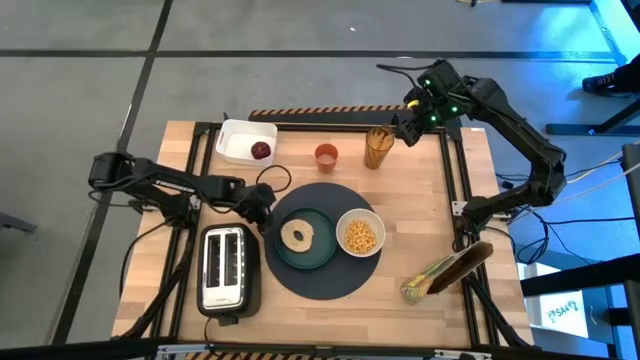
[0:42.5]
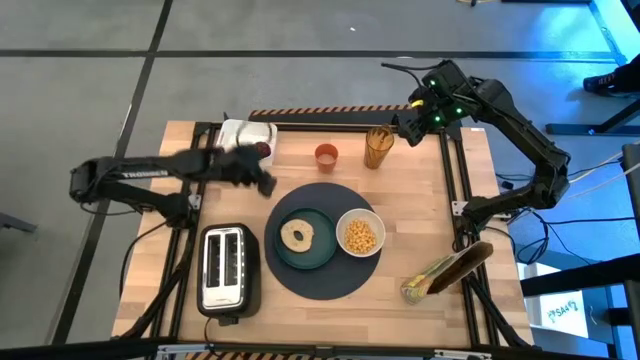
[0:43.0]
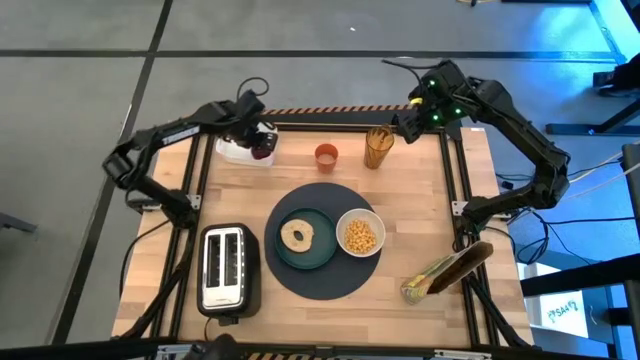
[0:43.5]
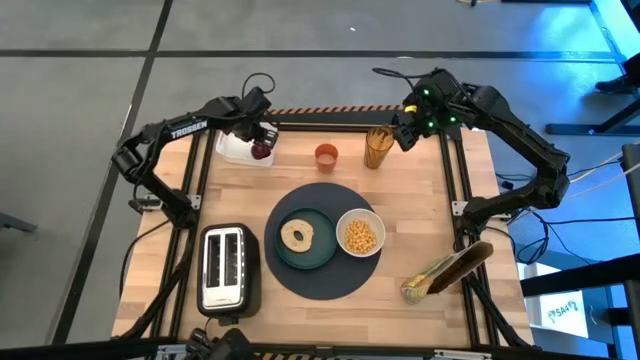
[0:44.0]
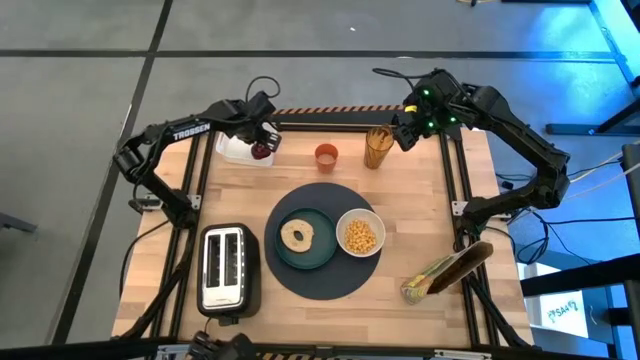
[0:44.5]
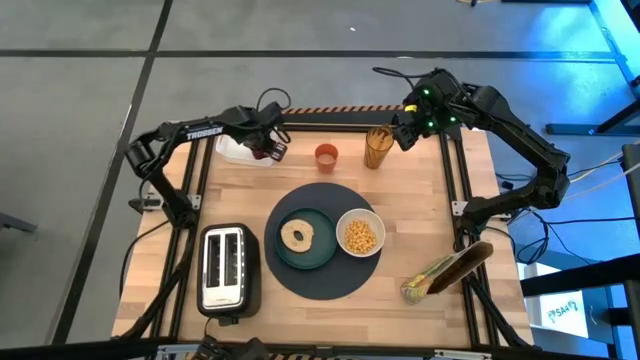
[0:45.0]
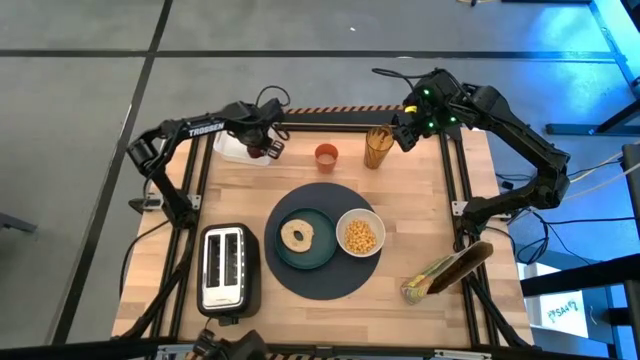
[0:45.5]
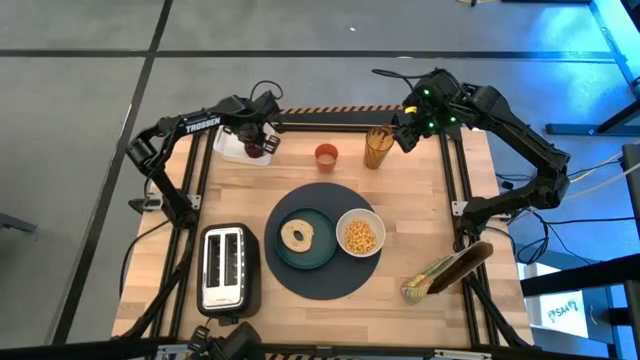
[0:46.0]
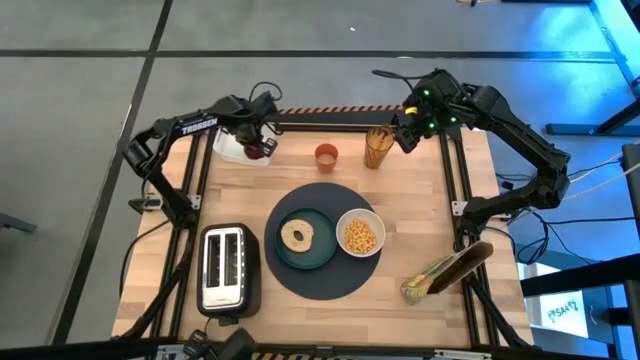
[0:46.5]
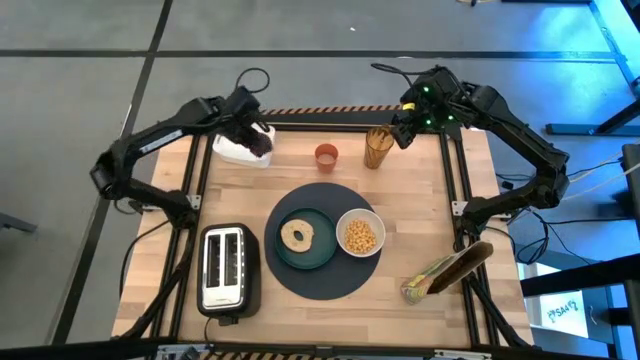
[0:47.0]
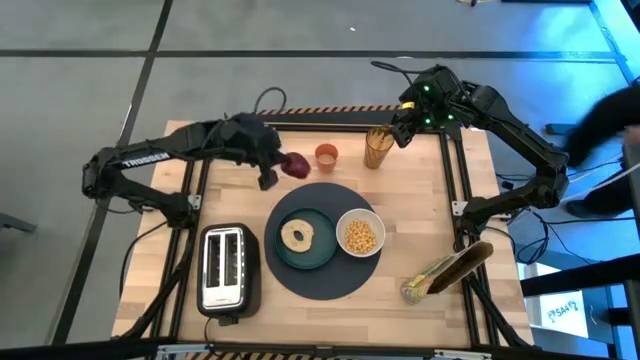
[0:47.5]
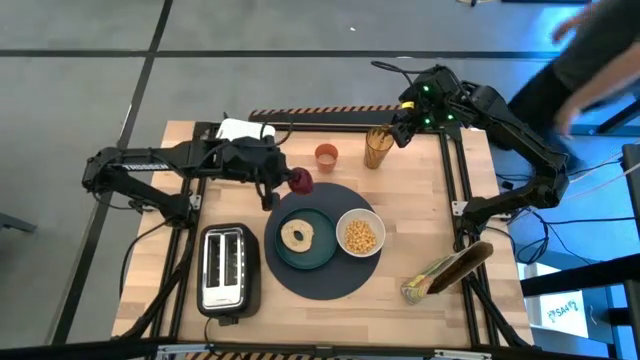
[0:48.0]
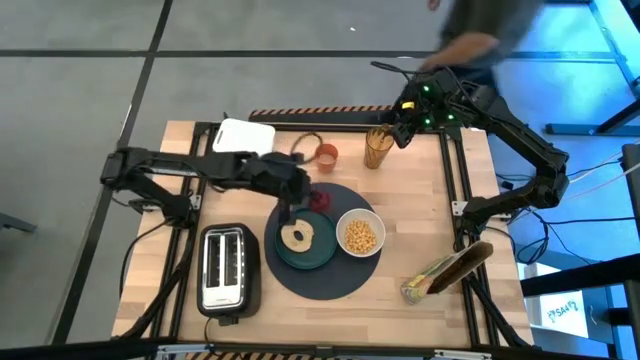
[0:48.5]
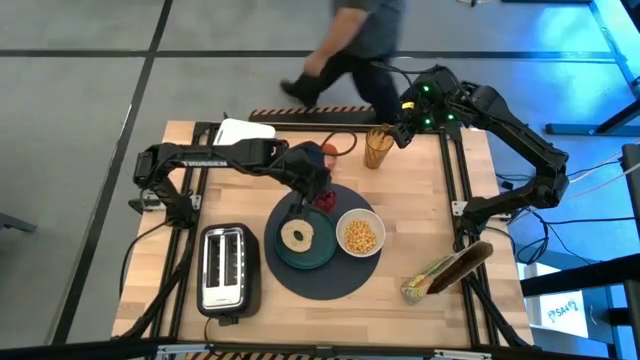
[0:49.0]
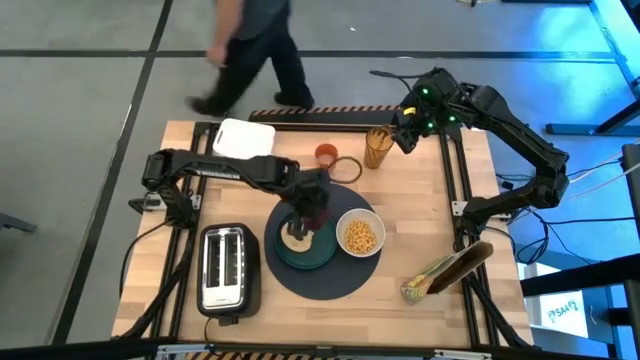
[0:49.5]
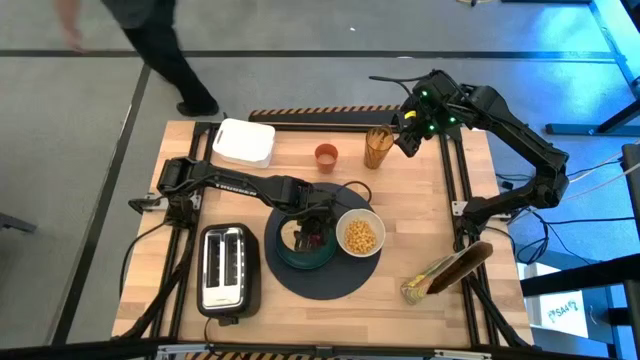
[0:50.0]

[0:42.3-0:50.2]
Task: Arrange a breakfast setting
Put the red apple on the green plate

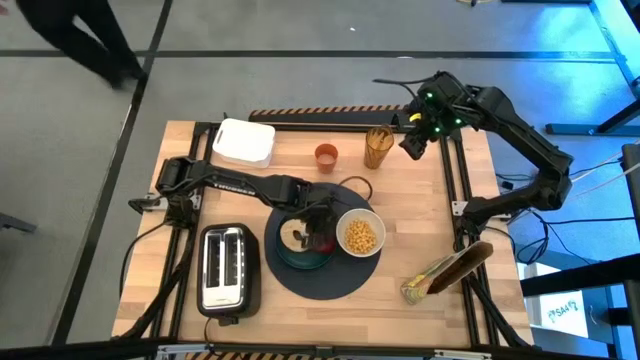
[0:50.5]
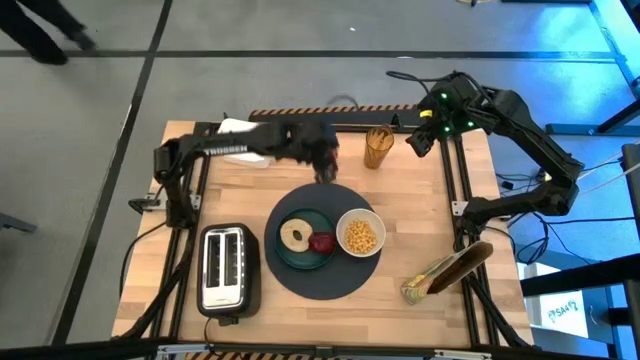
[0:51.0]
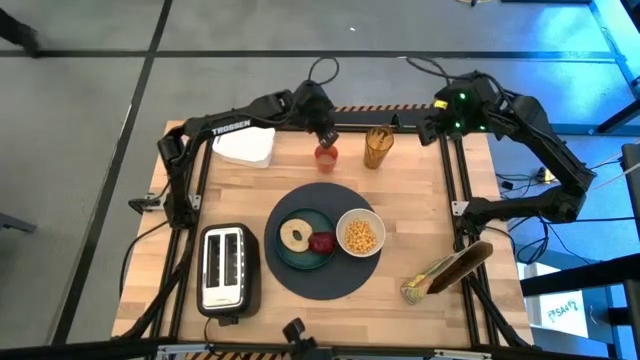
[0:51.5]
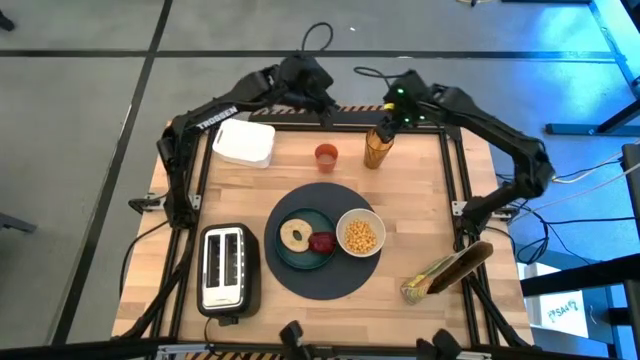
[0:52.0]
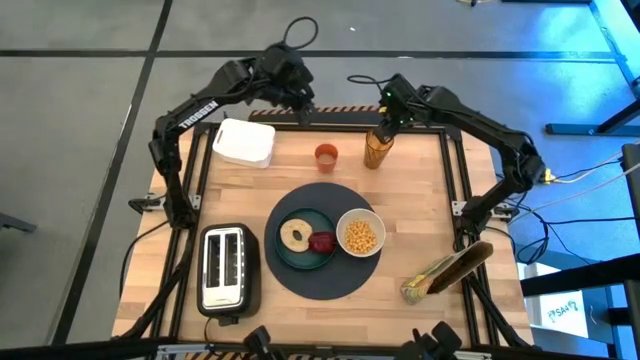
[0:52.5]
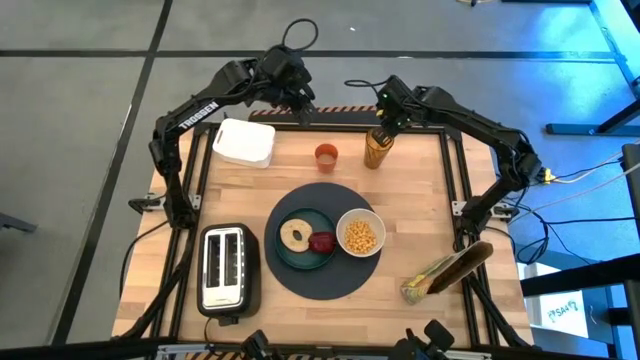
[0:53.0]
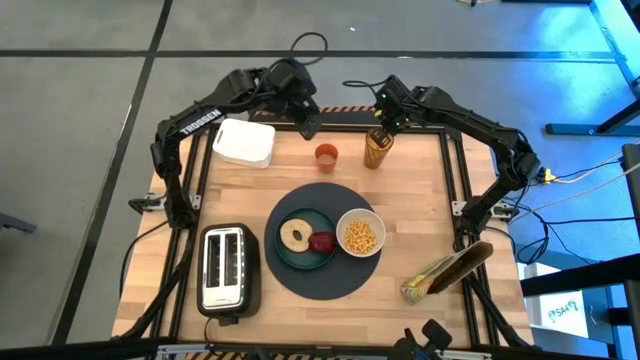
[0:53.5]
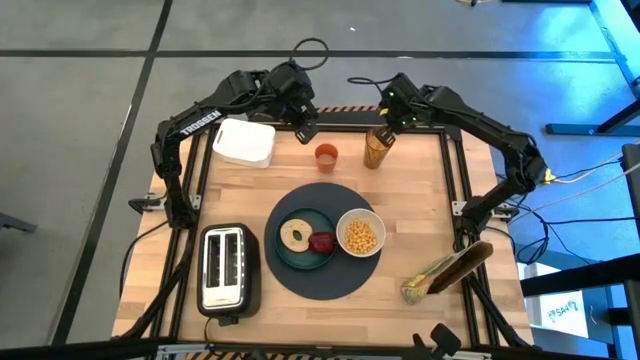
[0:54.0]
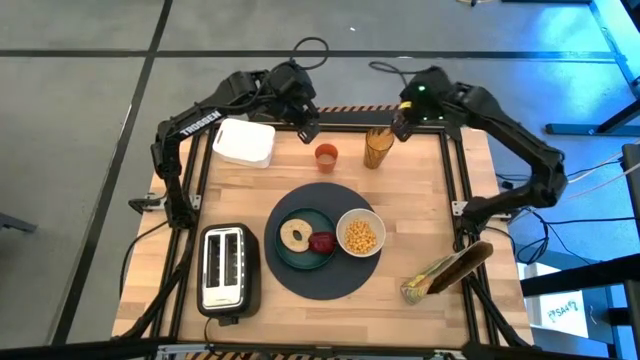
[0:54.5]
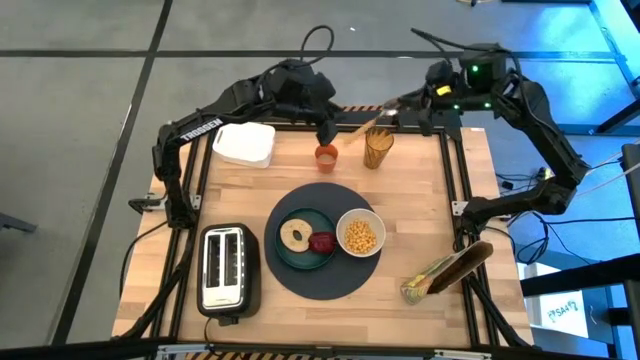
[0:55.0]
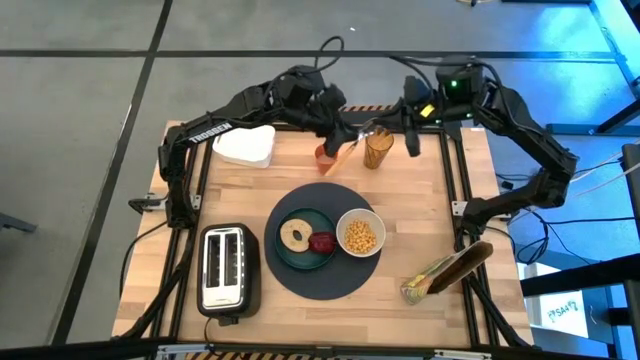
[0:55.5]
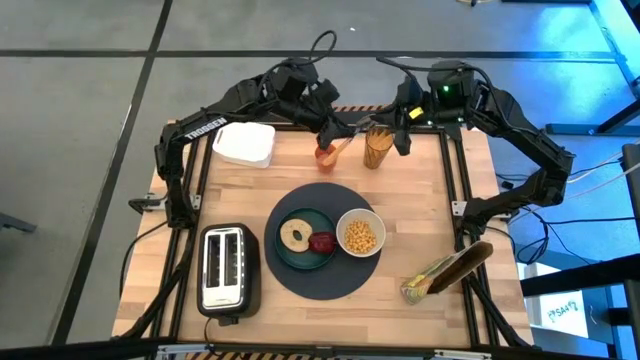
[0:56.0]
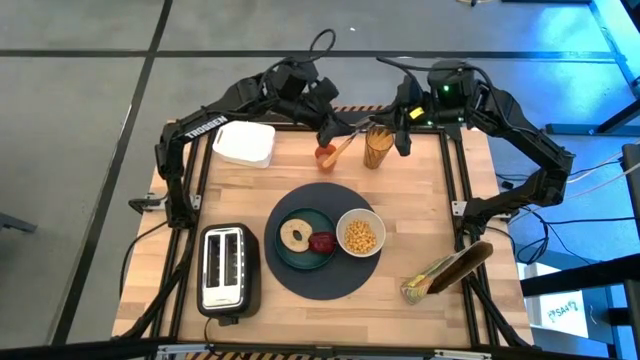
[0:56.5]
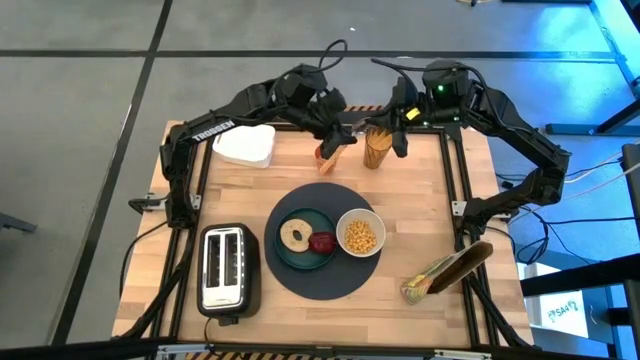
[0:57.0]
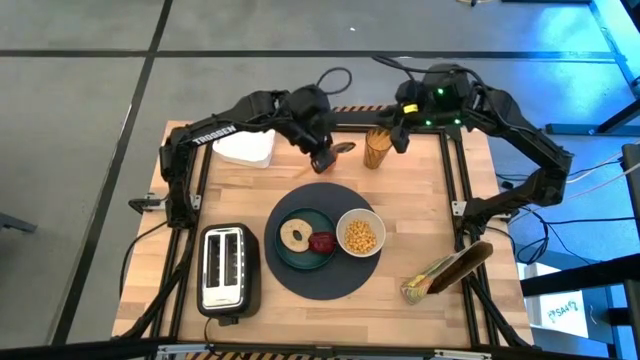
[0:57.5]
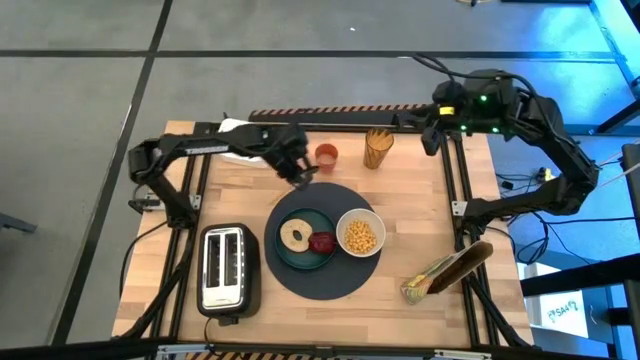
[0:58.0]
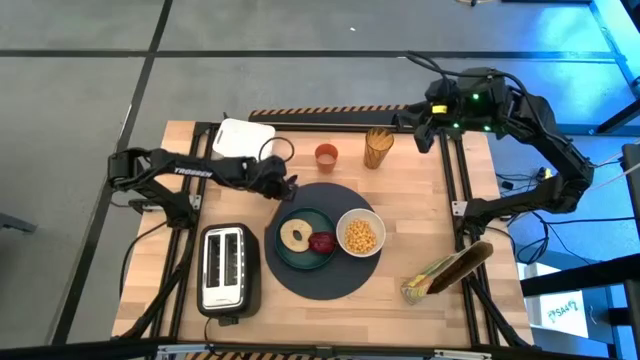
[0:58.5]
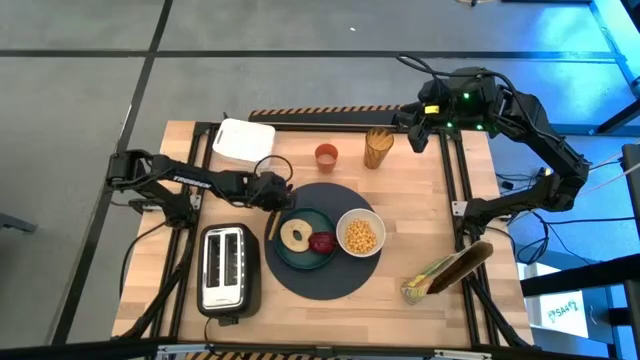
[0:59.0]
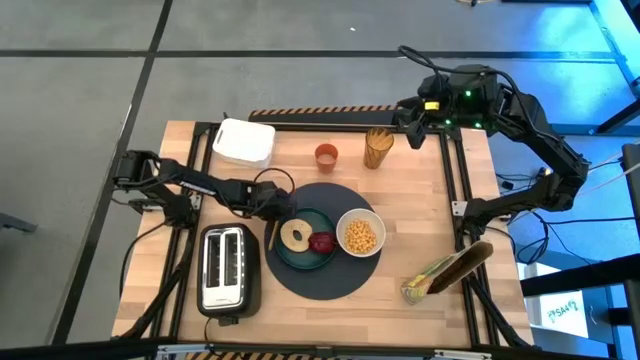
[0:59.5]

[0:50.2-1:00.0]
Put the orange spoon on the table mat

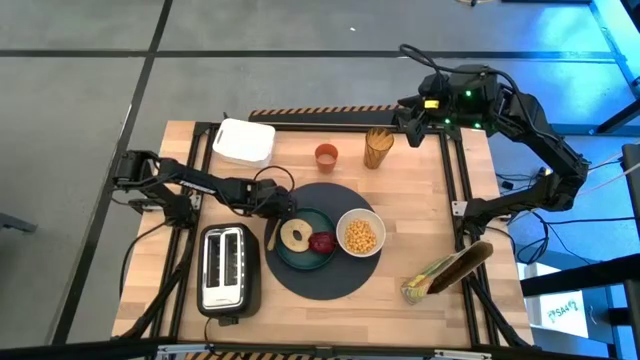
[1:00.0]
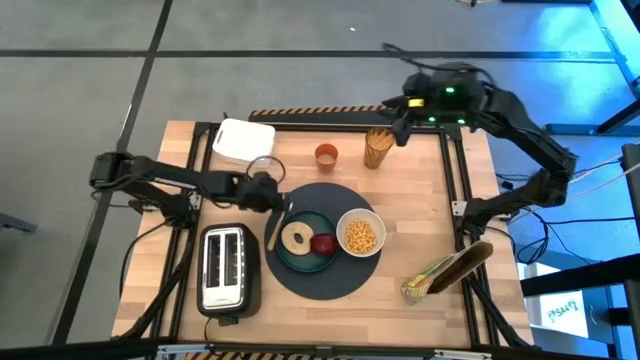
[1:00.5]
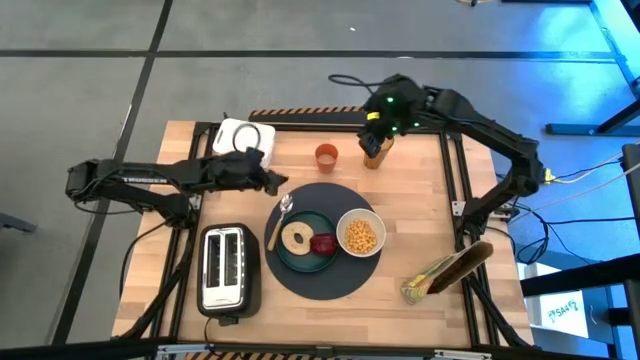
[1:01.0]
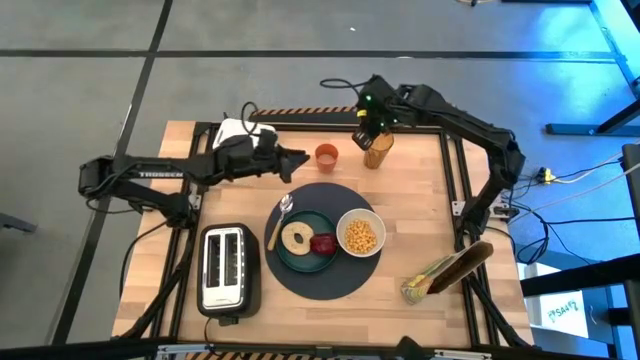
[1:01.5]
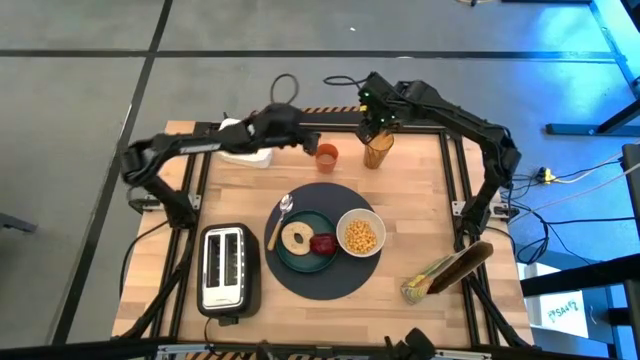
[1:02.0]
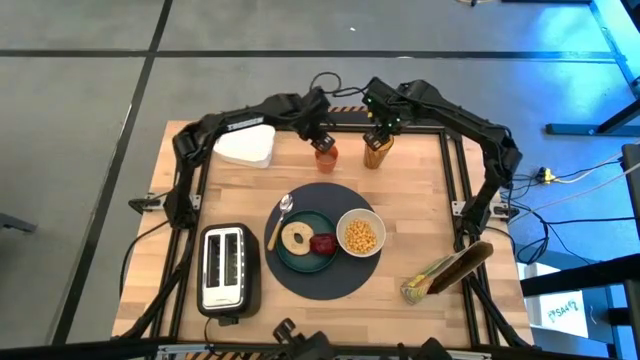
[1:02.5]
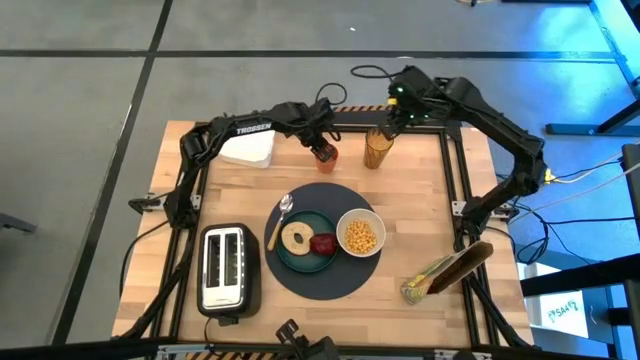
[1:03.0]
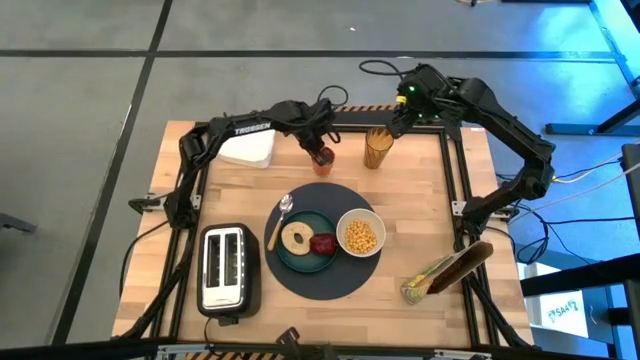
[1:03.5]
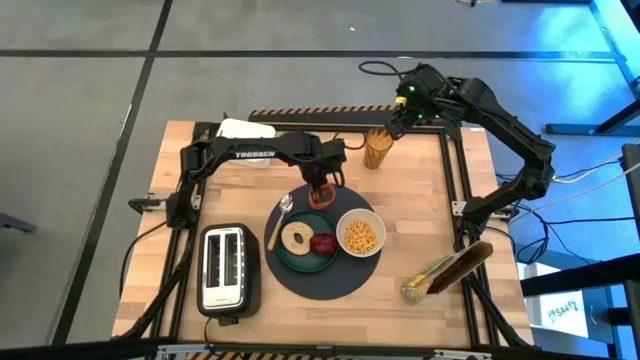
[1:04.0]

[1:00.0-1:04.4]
Put the orange cup on the table mat
